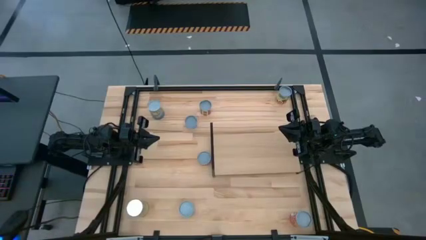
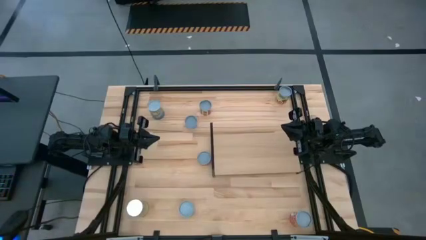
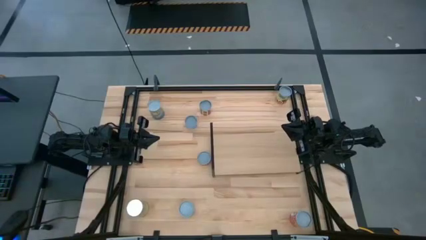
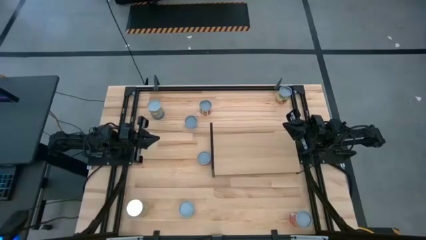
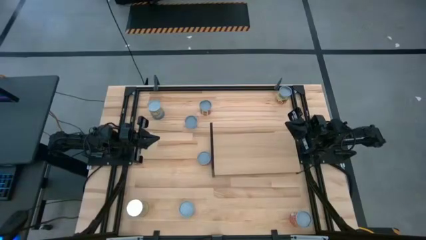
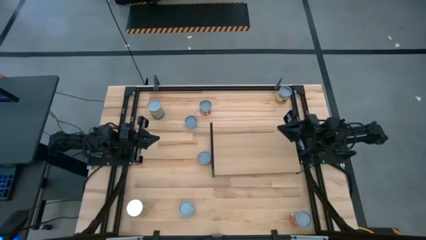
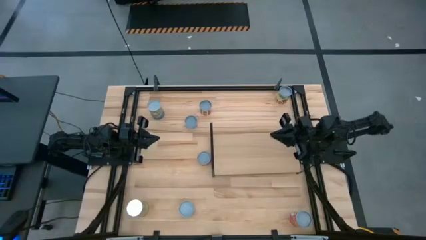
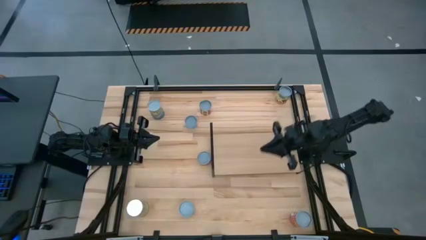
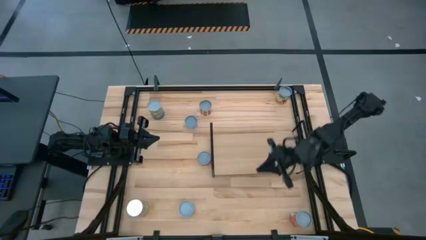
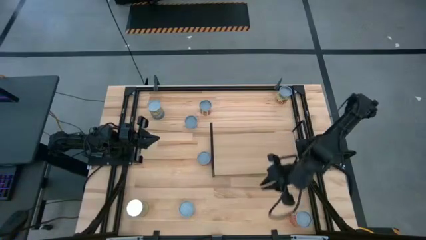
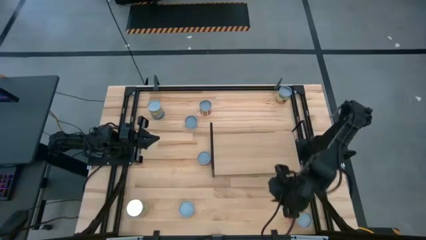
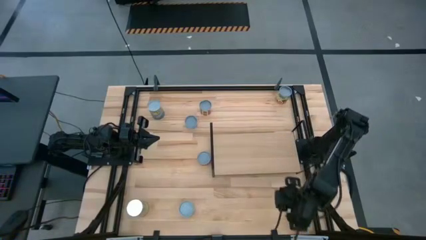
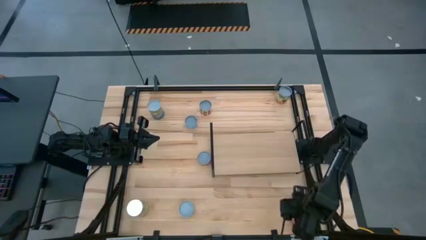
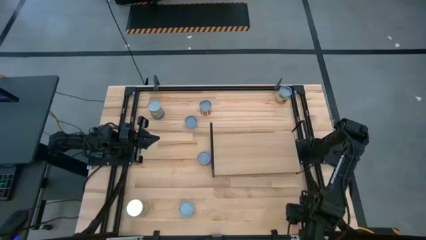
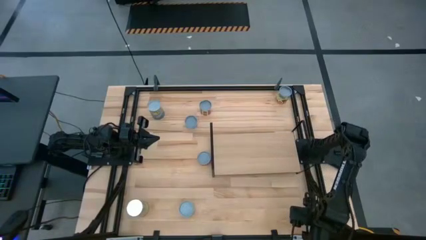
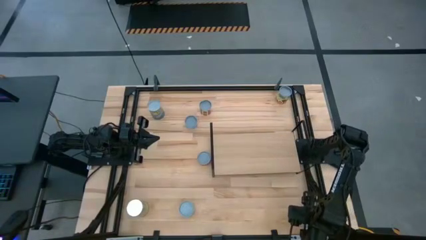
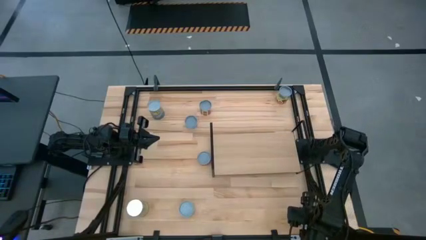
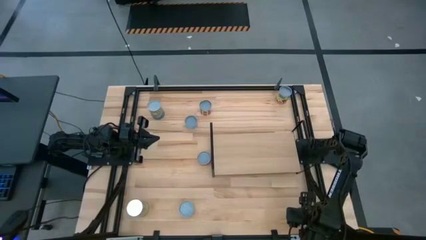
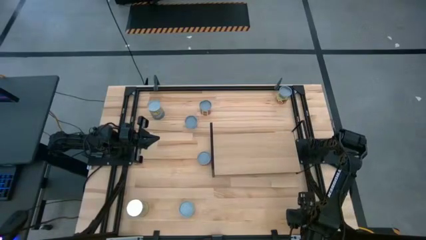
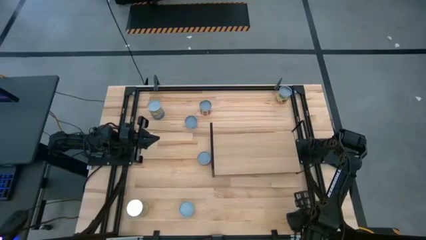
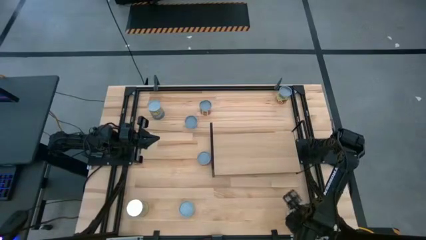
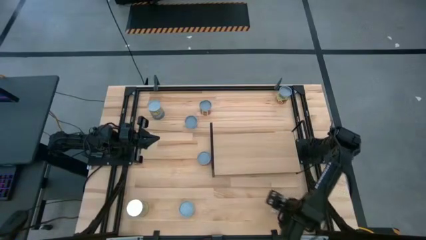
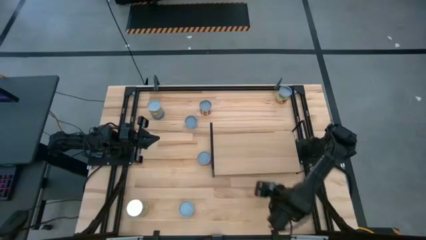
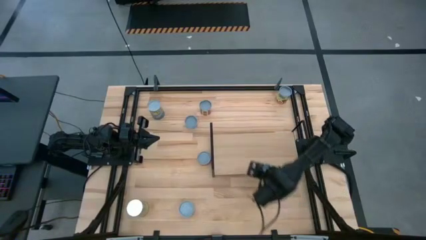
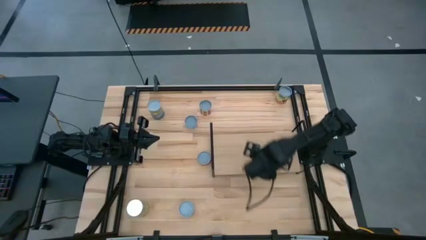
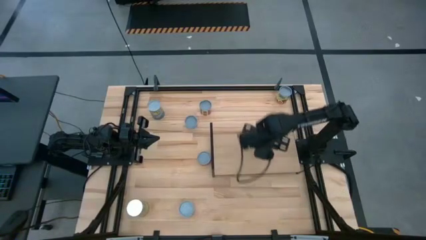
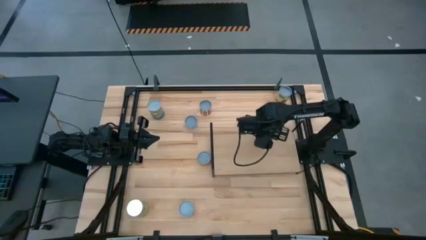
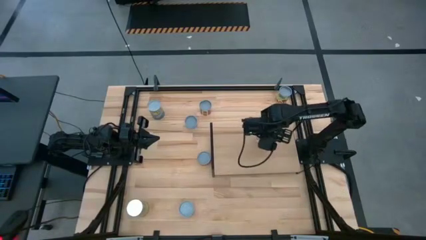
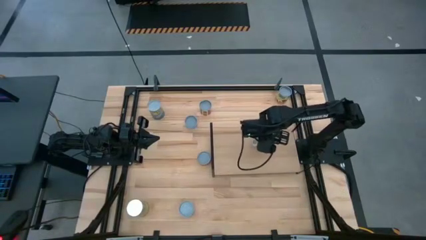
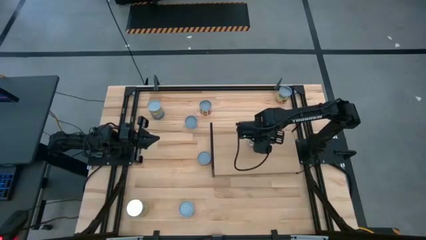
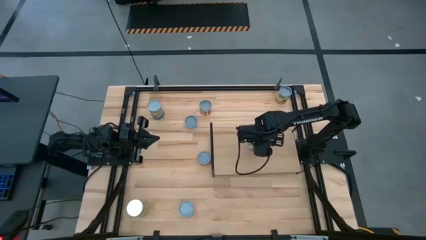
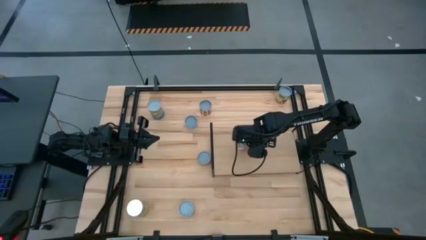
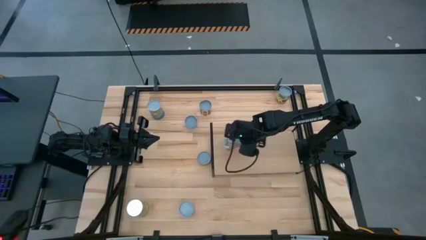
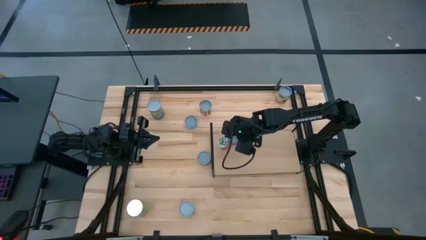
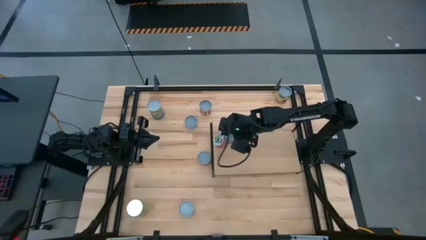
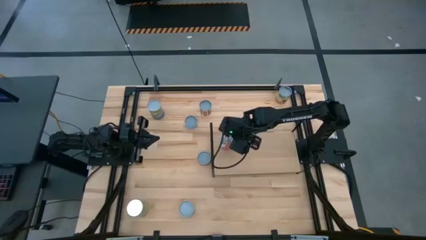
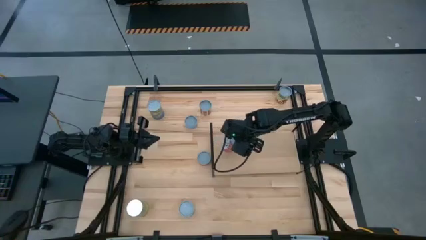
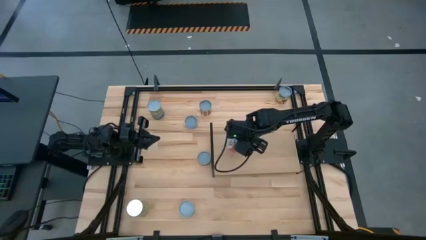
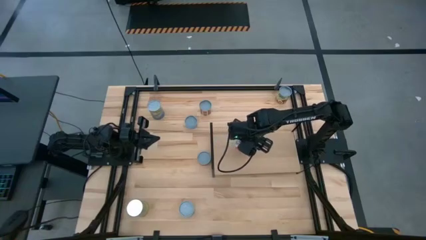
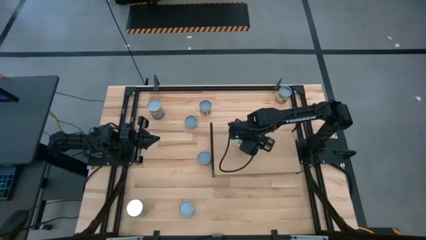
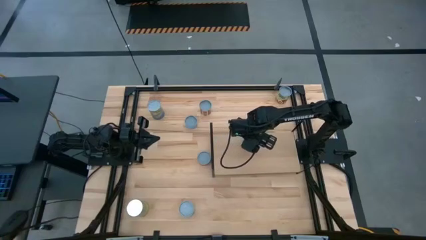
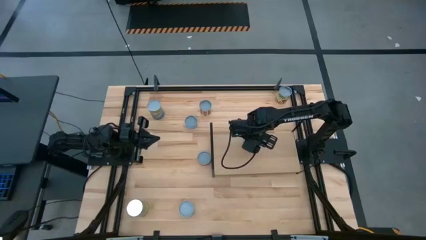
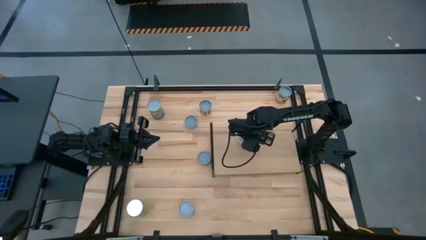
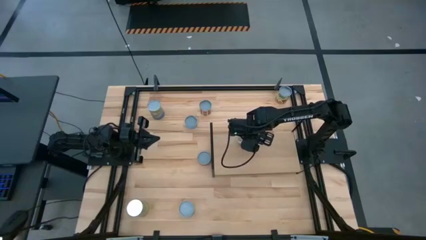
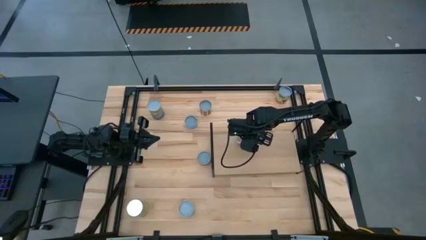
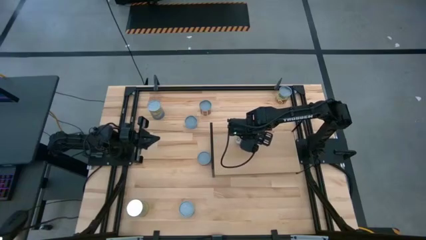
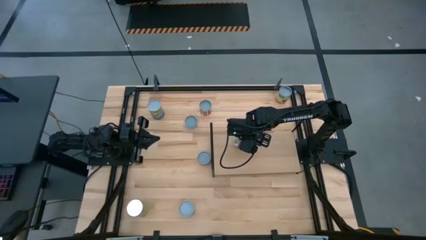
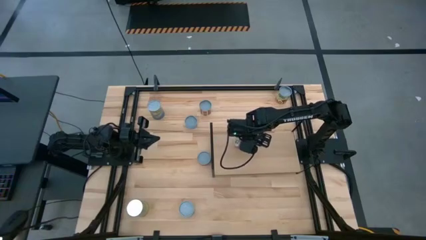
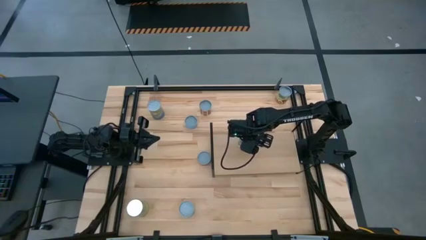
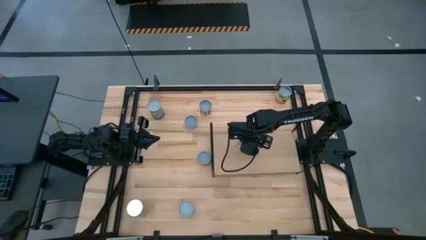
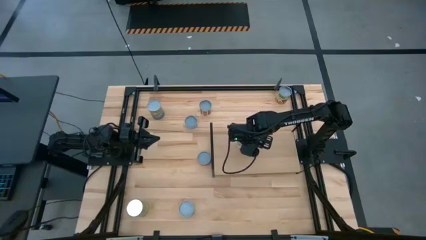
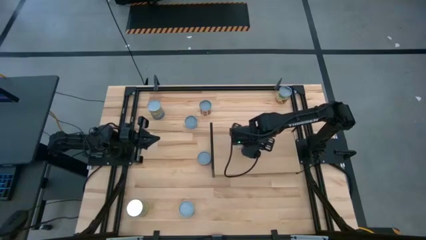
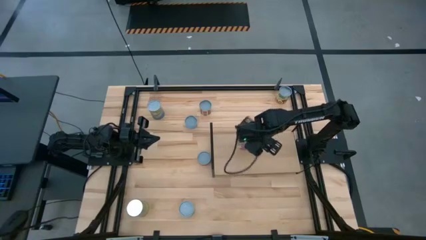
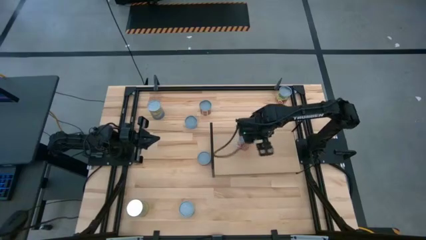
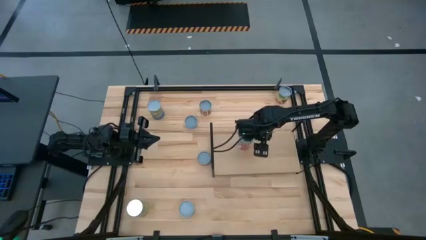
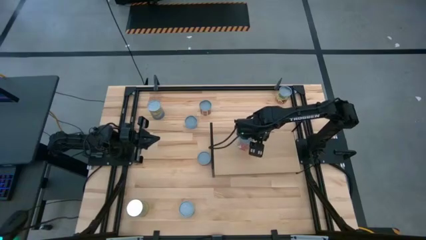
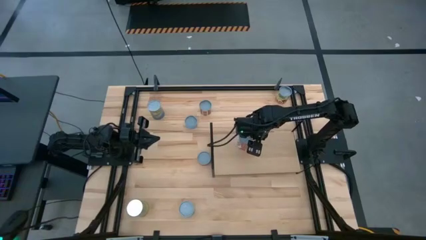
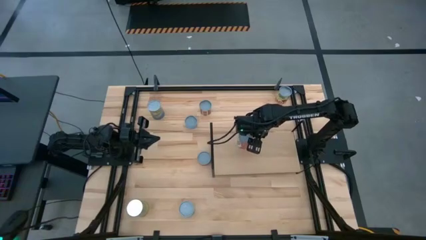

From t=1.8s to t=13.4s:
Task: Pick and place cans onto a shelf
Put the light red can on the shelf
